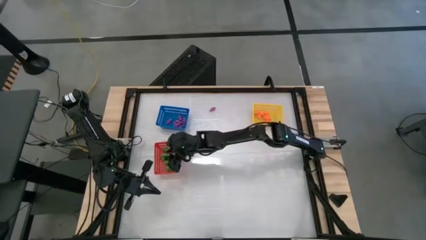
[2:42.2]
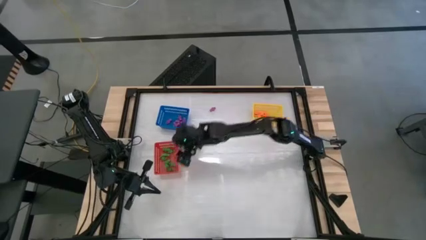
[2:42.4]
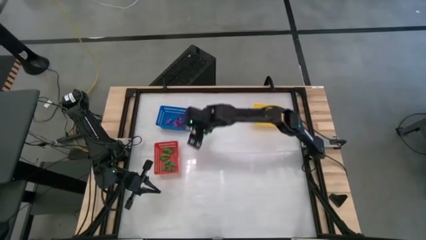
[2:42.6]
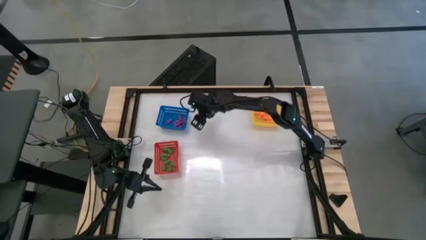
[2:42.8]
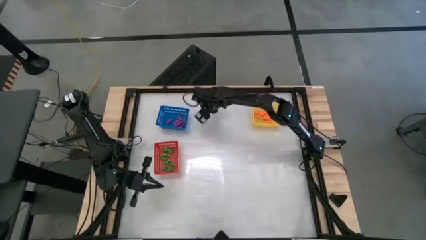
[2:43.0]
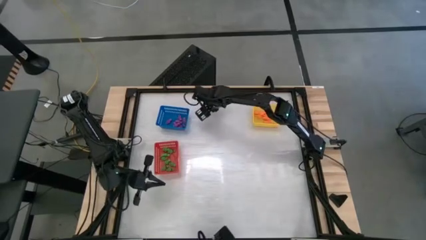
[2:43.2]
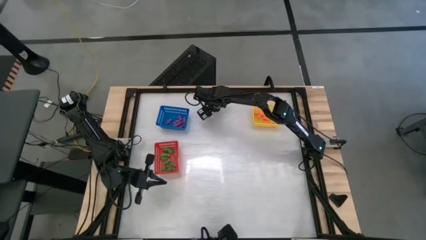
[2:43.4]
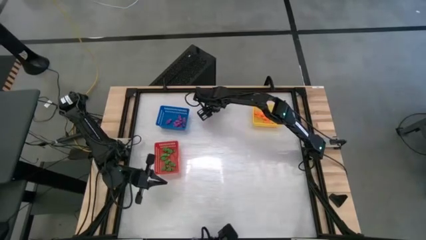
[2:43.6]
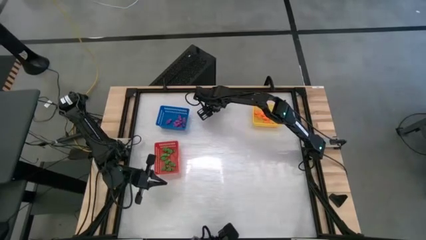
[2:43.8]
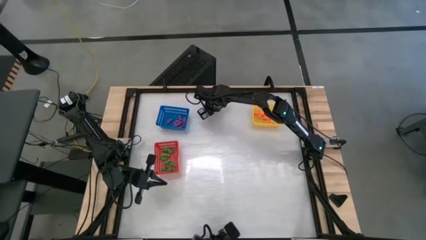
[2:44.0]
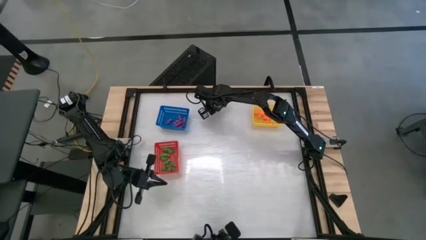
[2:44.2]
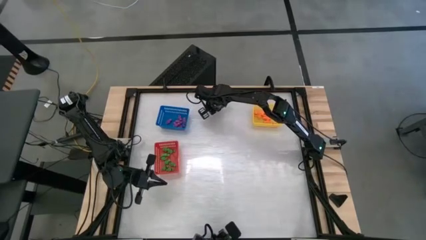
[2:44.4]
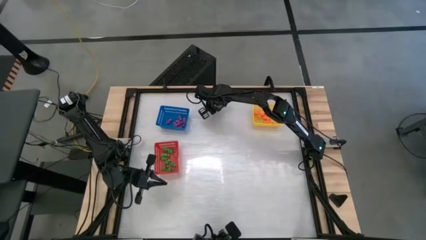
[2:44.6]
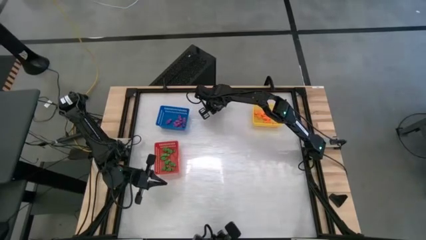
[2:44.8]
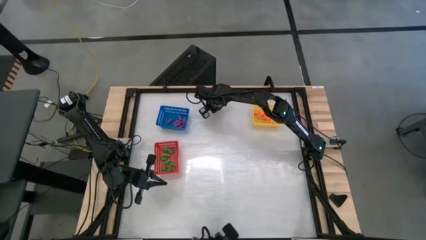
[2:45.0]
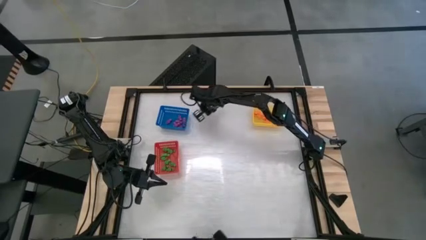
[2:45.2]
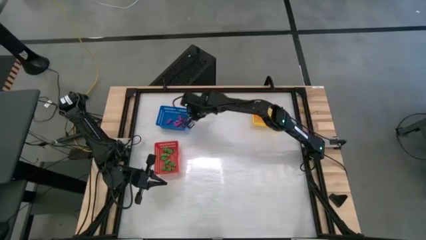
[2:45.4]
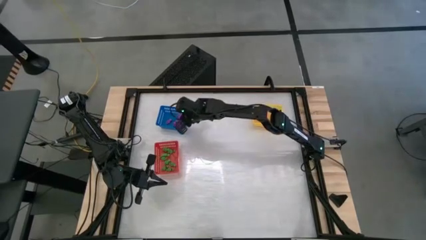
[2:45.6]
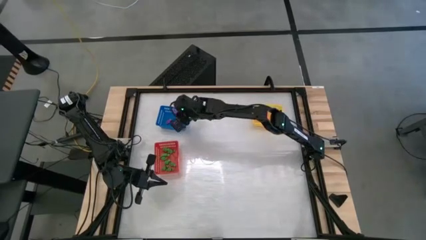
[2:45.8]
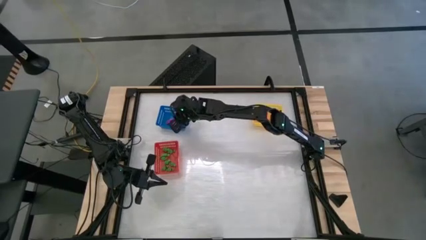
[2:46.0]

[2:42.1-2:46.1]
Task: Sort Halloween decoration
Put the violet skeleton toy into the blue bin

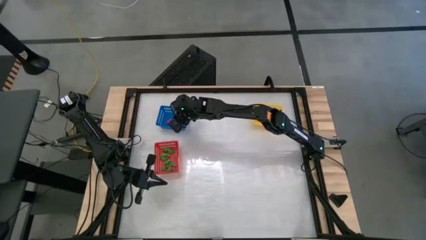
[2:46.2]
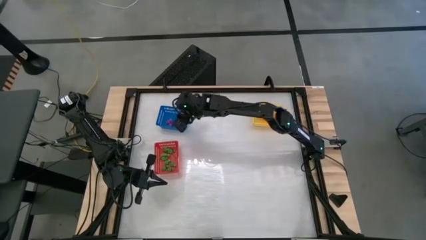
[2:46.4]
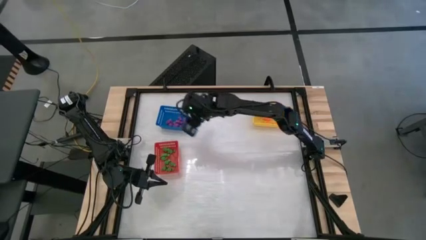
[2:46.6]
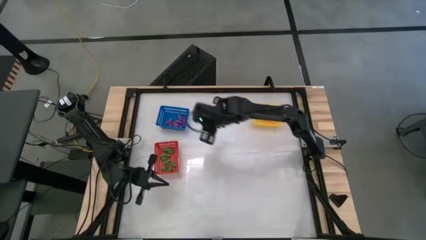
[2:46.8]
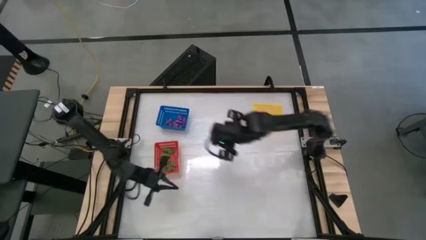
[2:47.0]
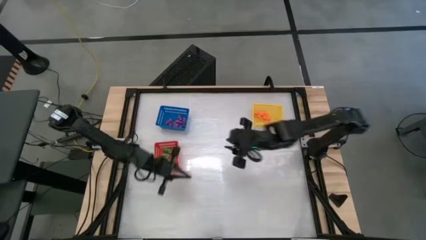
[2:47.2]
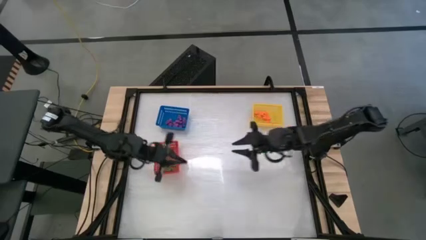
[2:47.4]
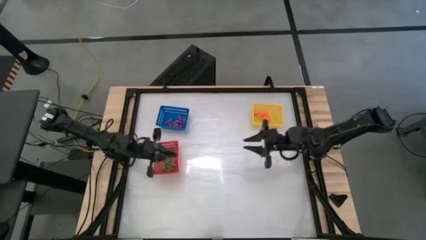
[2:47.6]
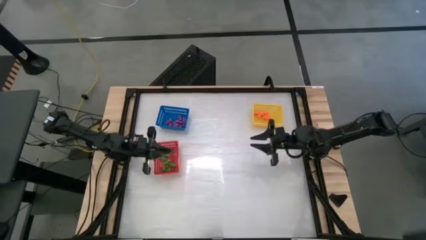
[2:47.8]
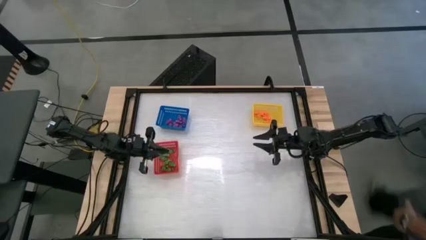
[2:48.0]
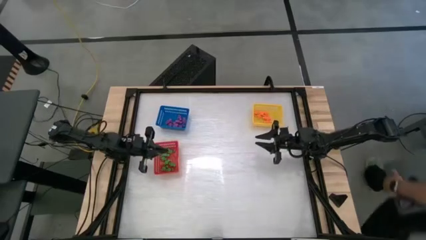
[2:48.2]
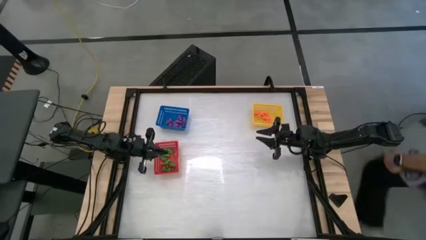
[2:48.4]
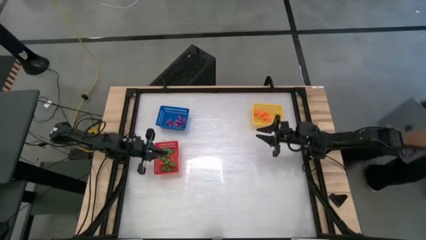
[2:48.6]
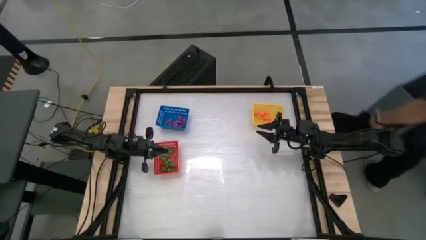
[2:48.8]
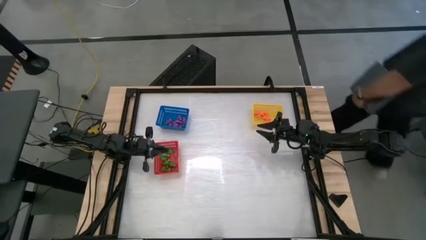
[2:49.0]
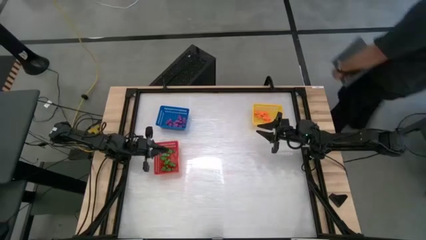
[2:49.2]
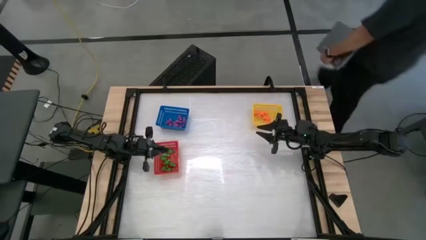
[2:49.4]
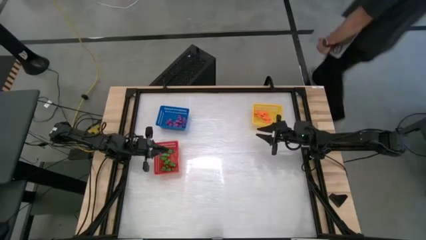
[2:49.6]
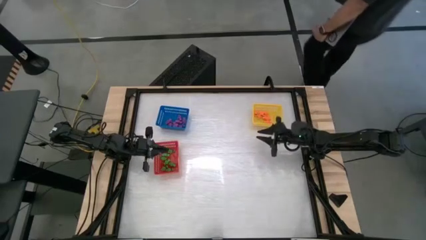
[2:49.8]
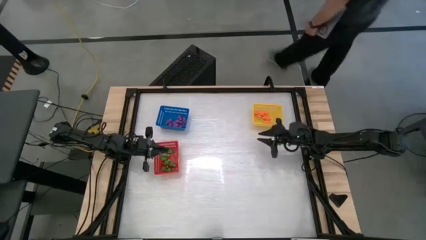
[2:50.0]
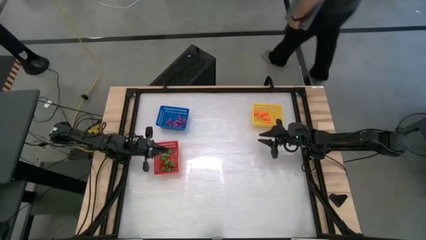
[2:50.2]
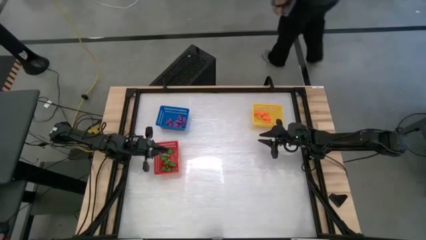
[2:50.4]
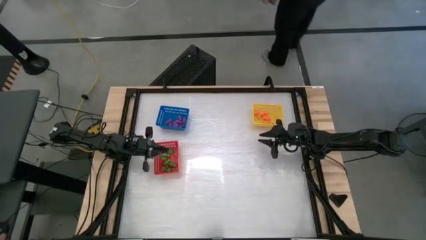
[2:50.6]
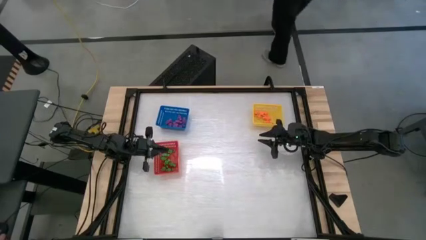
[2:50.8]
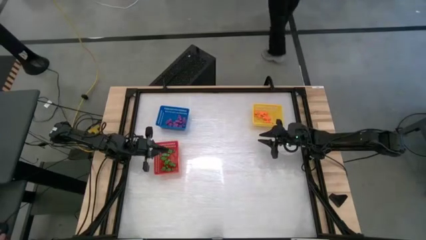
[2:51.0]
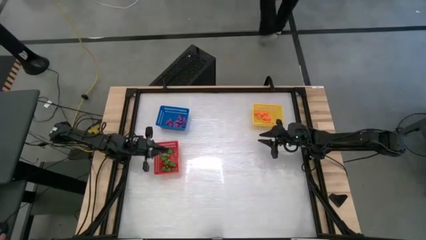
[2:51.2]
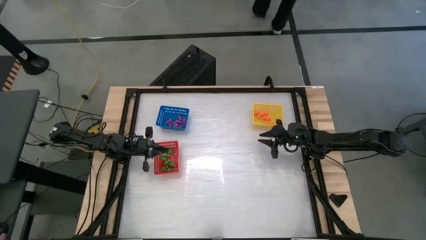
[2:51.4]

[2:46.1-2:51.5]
Return to Home Position

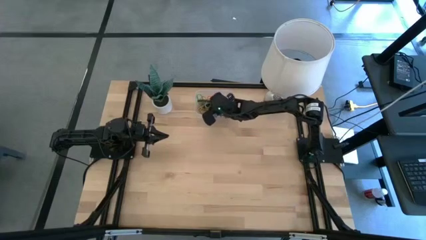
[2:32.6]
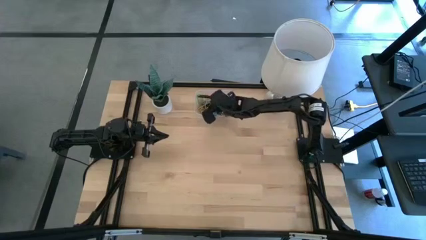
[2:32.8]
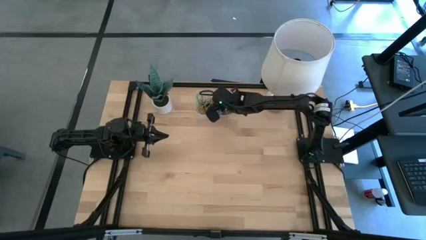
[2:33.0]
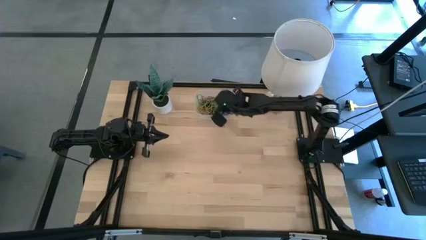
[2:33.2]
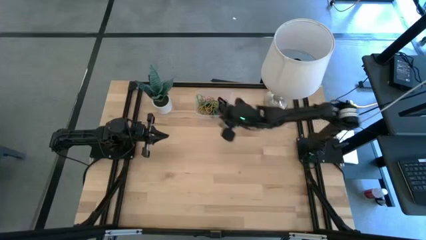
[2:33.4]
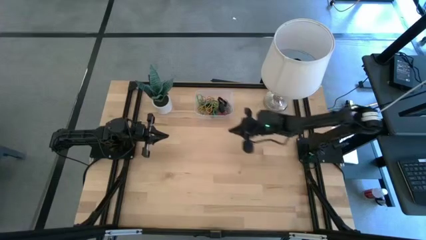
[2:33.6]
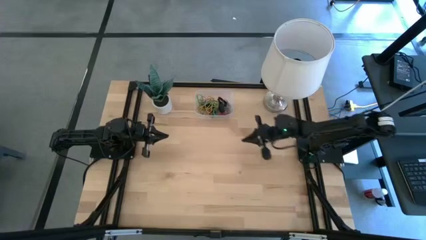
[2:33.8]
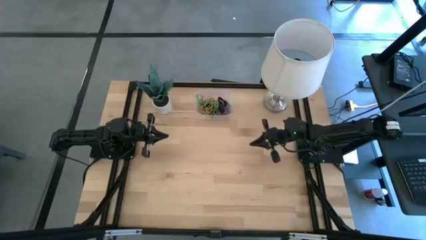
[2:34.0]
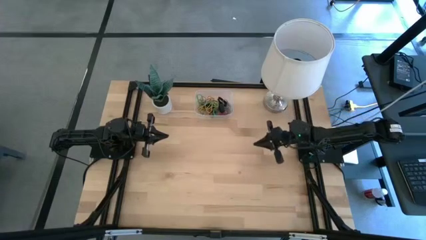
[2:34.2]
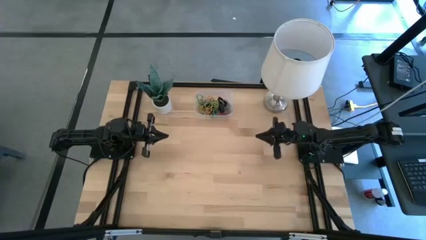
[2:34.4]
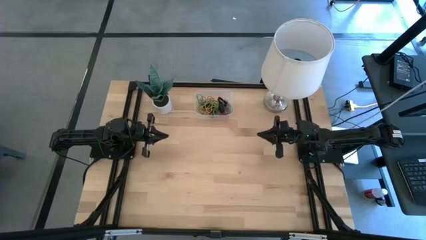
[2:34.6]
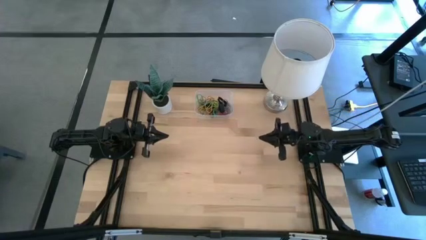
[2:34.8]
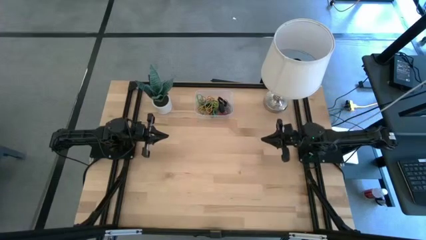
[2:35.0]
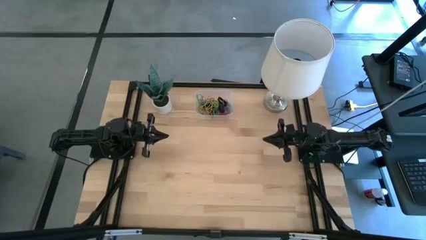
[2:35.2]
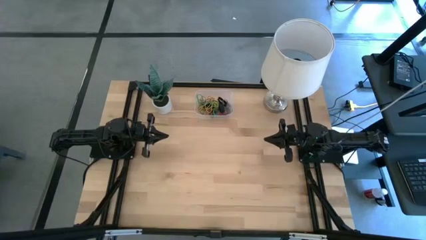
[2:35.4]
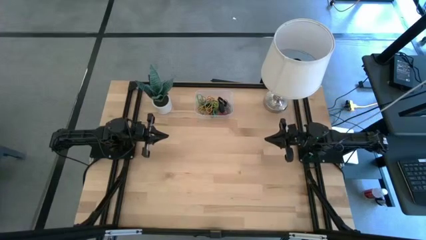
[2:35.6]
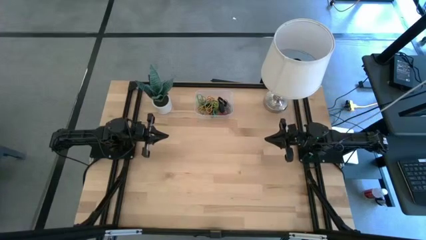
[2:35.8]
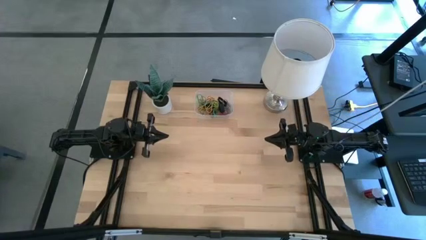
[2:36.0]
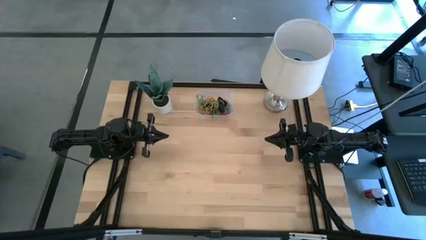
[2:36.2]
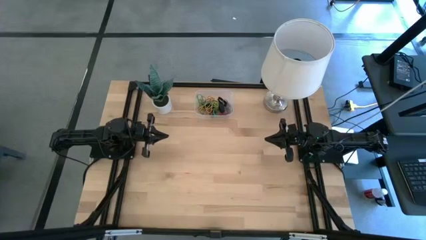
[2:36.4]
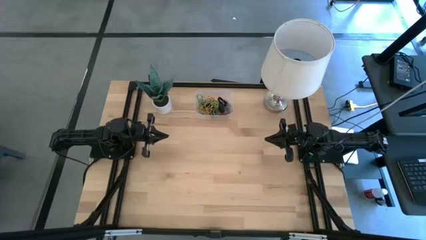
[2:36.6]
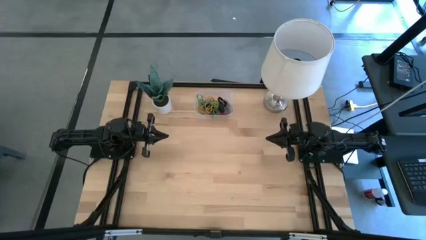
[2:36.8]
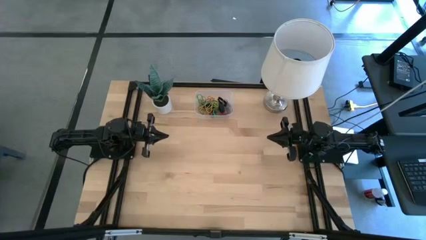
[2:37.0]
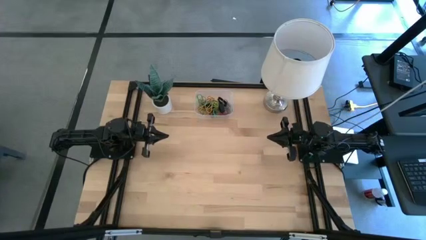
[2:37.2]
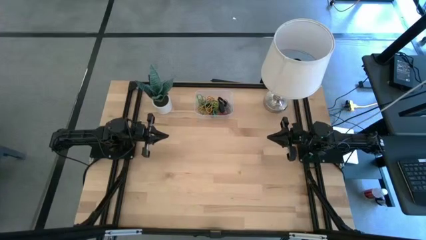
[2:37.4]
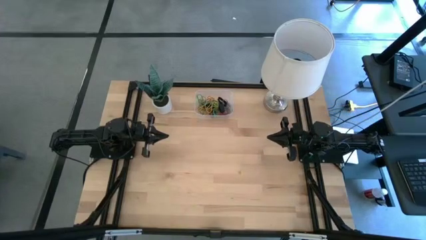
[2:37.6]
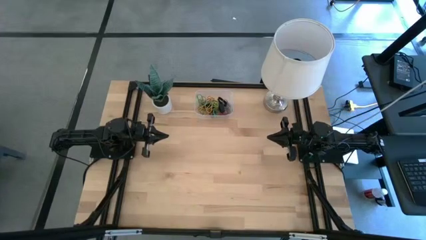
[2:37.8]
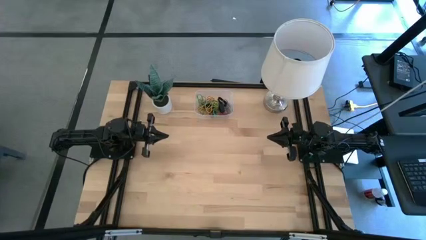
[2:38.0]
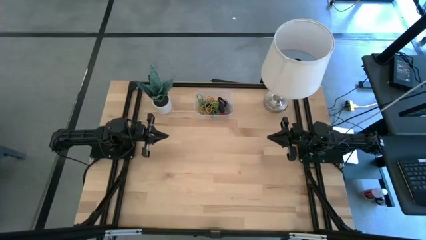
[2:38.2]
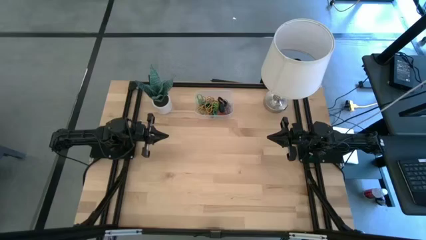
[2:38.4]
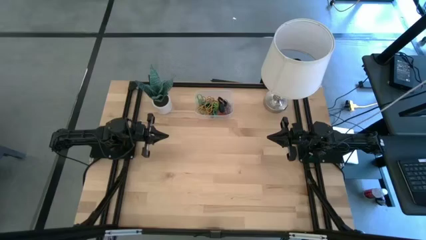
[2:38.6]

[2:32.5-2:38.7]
Task: Pick and place rubber bands into bin
Return to Home Position
